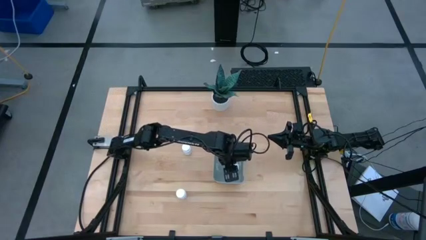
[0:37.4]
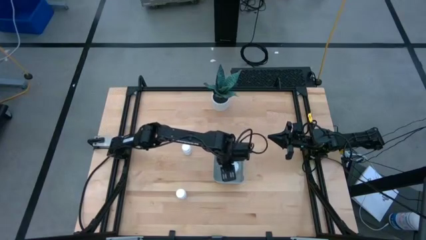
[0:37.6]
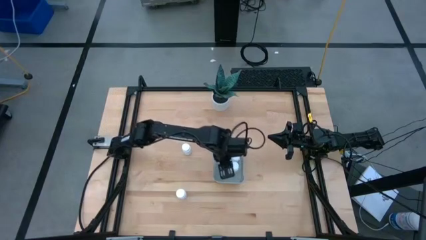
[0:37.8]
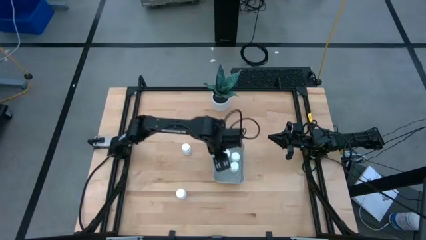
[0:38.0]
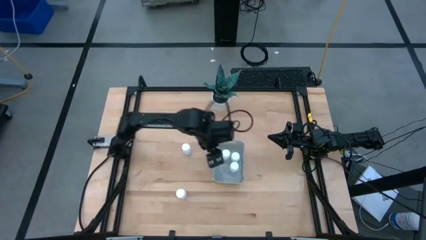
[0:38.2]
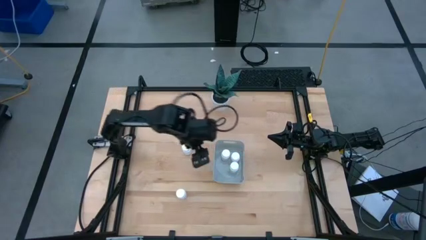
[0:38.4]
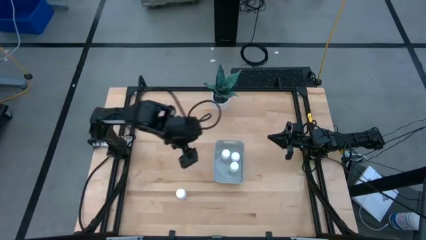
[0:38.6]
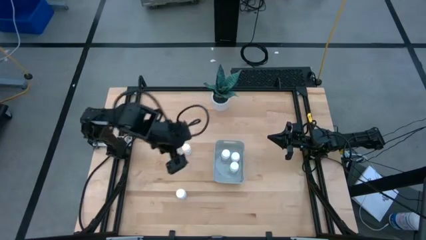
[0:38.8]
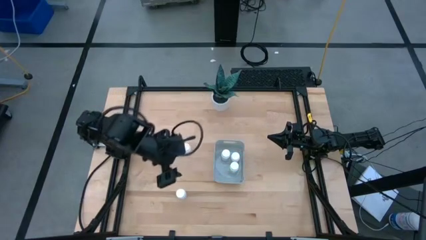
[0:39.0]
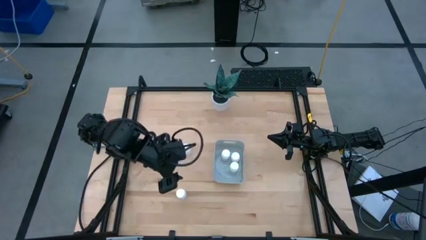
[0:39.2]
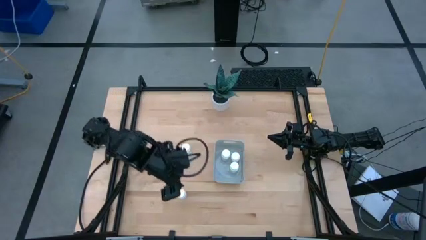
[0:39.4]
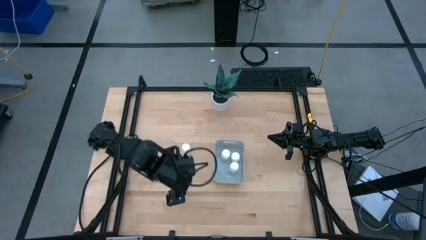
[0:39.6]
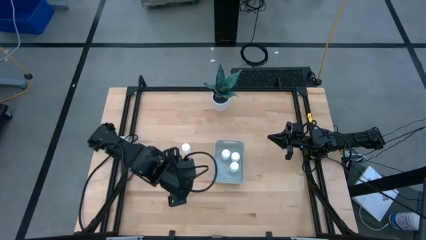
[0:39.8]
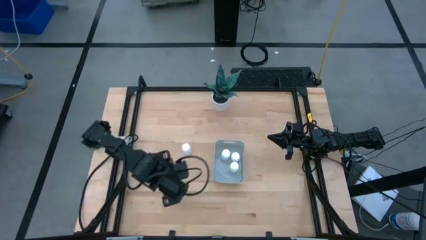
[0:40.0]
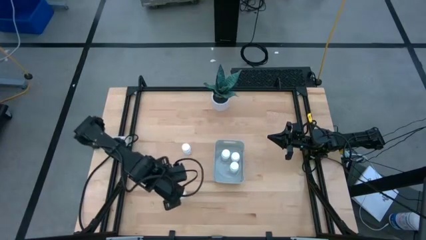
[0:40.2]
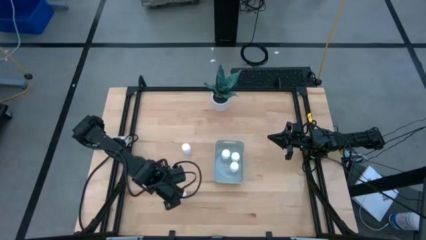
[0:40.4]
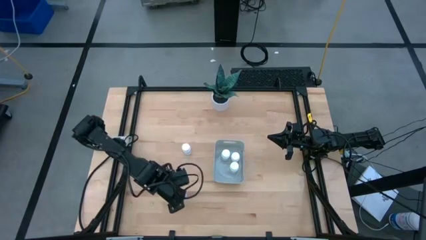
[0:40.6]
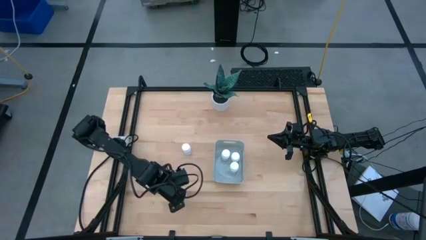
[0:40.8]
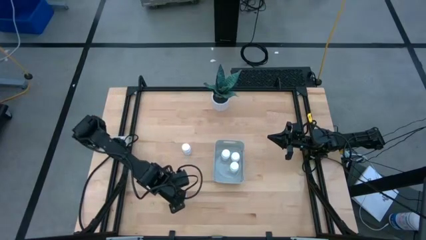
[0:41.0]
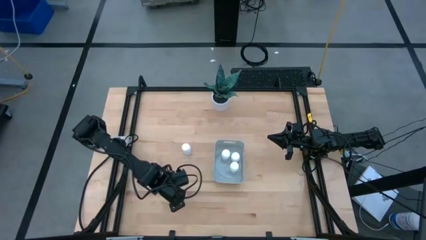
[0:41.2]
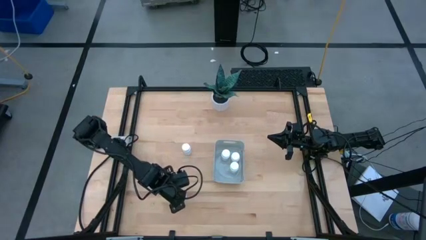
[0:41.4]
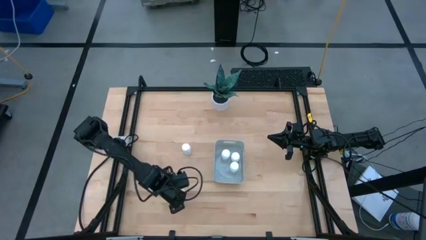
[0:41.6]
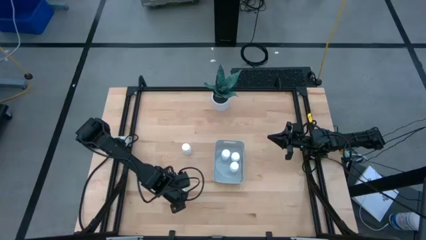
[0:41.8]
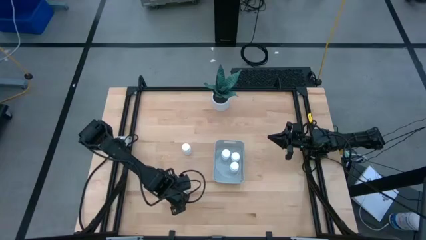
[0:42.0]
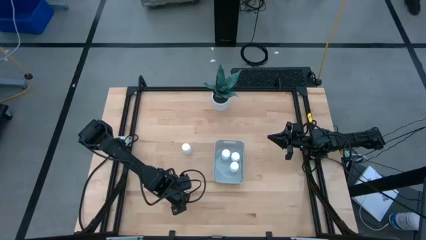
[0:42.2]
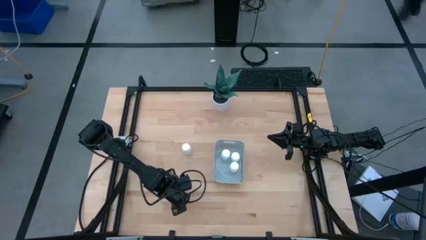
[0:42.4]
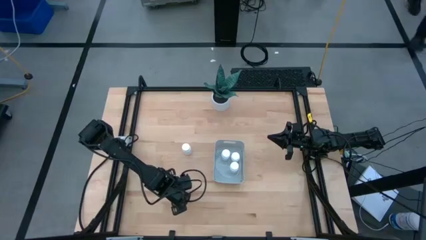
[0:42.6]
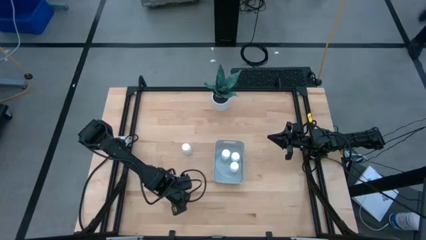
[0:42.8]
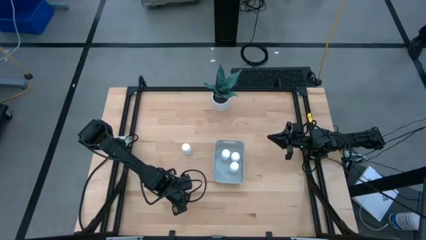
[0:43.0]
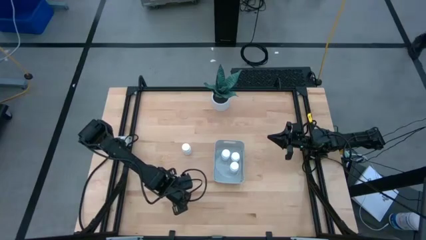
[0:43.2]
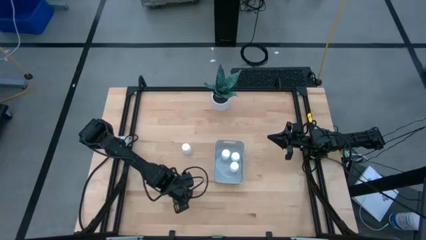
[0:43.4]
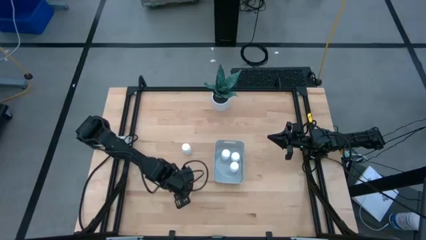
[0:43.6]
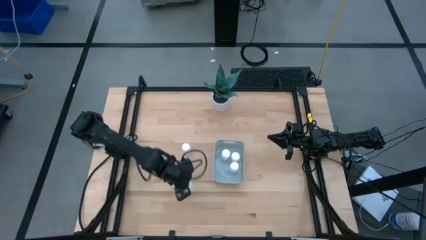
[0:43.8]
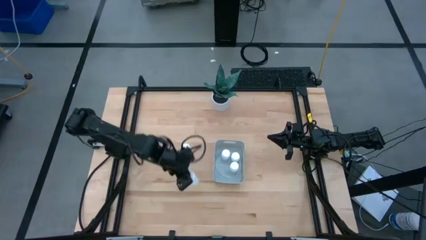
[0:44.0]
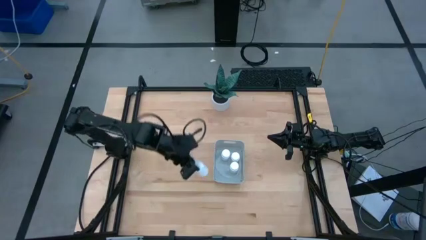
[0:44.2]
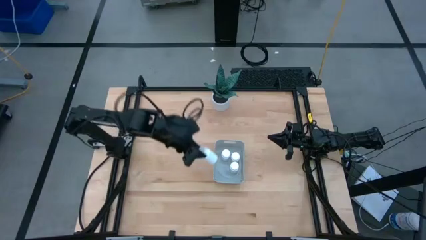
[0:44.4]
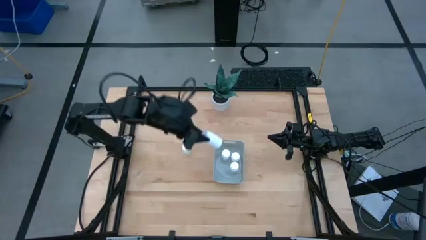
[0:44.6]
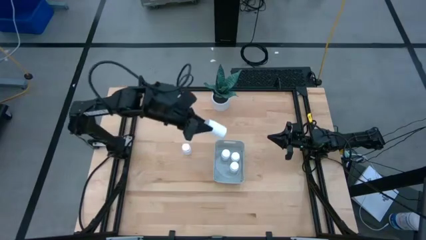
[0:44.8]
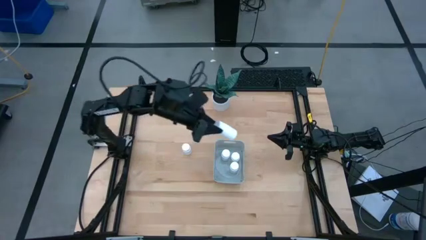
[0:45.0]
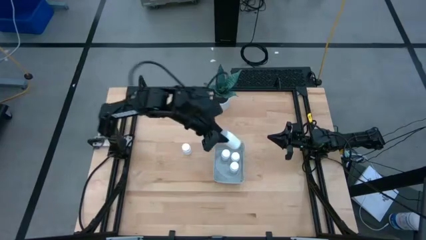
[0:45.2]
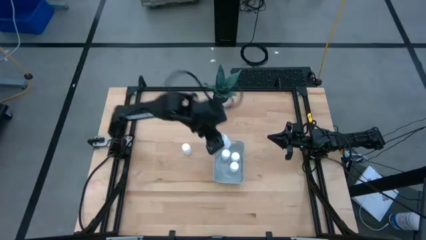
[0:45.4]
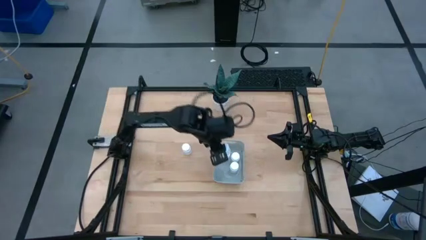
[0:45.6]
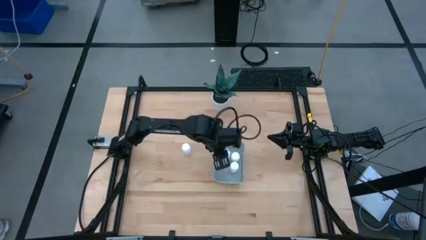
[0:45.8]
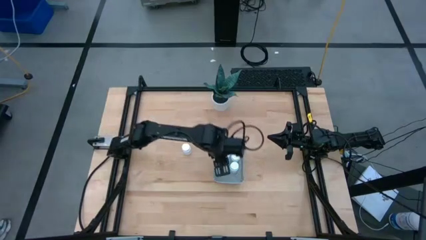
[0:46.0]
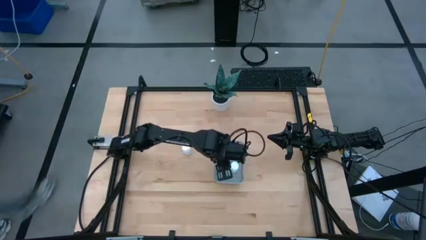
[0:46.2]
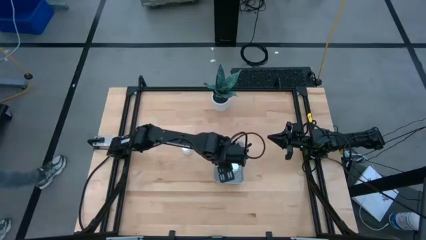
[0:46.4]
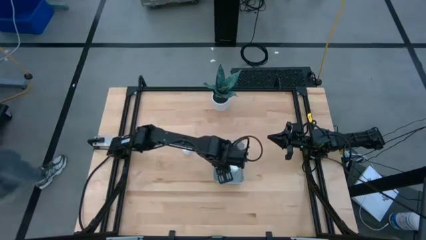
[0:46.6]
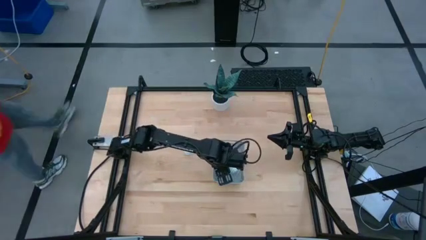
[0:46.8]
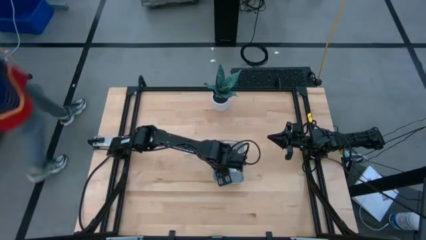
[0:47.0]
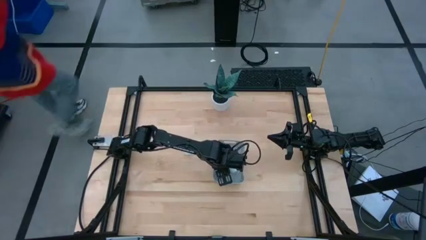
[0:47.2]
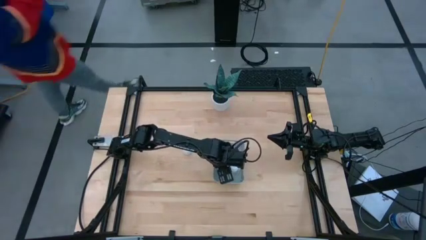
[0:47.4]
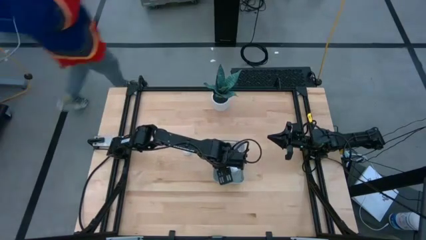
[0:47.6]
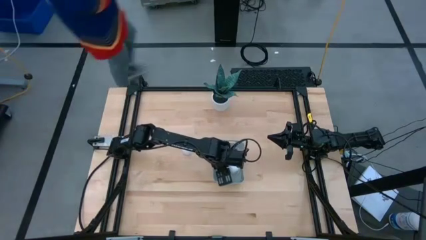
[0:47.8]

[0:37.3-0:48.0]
Task: Pick and place pill bottles into a basket
Put the white pill bottle into the gray bin

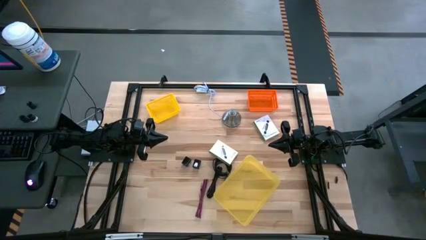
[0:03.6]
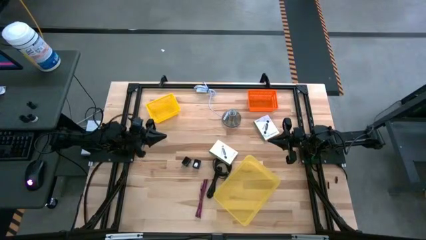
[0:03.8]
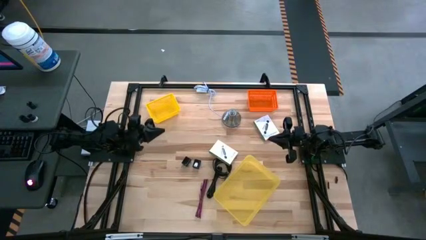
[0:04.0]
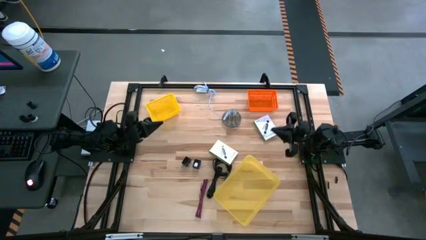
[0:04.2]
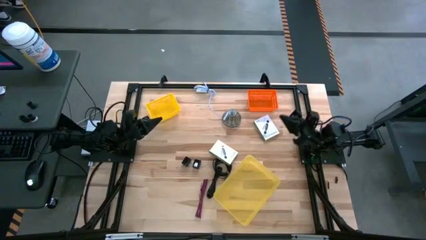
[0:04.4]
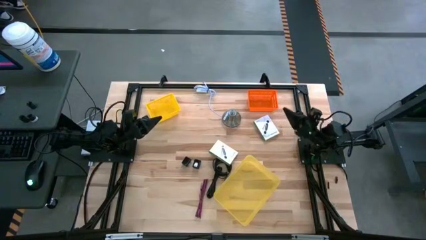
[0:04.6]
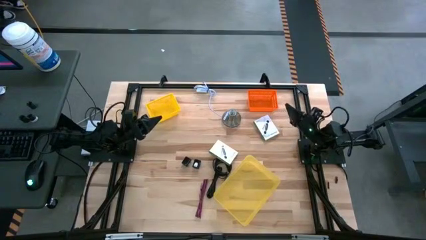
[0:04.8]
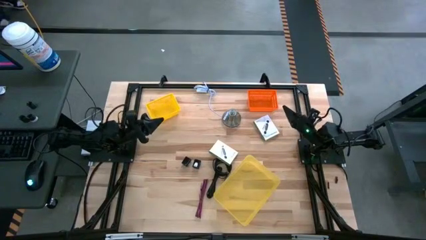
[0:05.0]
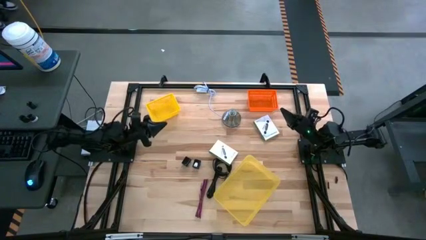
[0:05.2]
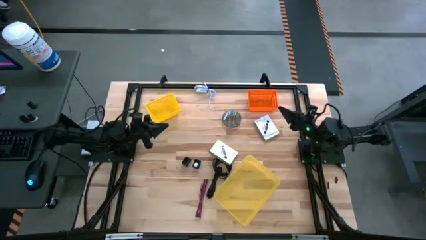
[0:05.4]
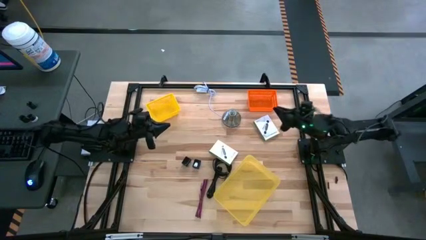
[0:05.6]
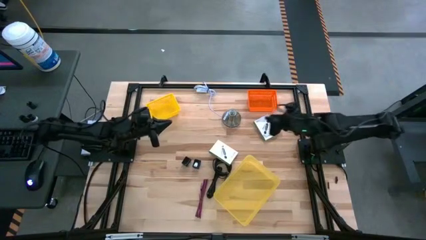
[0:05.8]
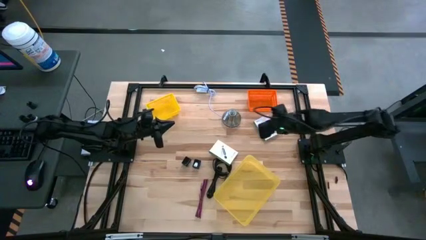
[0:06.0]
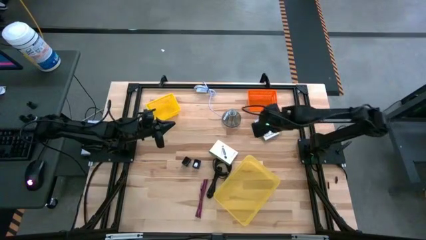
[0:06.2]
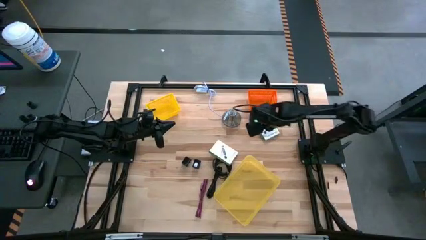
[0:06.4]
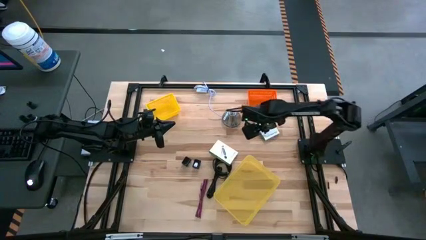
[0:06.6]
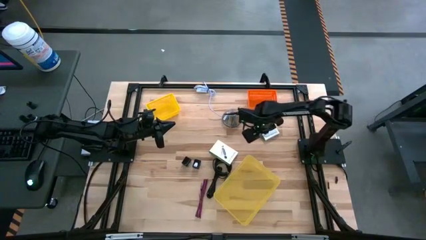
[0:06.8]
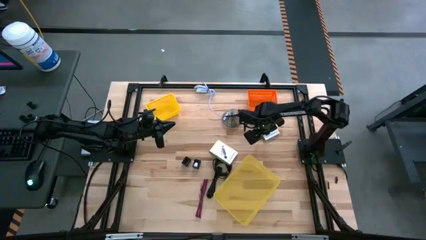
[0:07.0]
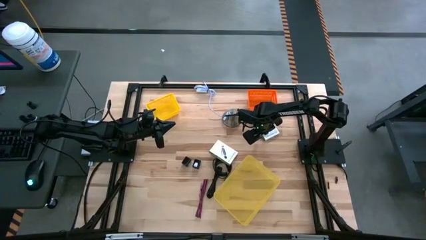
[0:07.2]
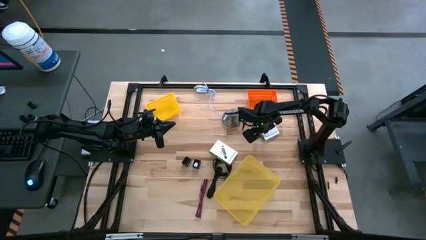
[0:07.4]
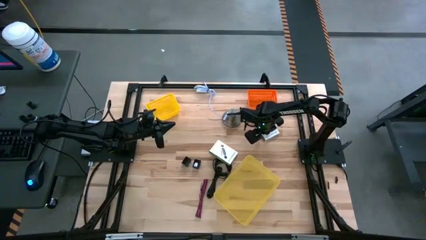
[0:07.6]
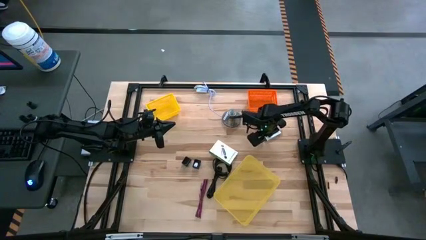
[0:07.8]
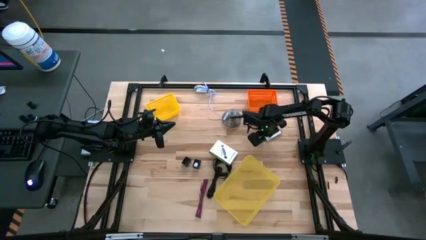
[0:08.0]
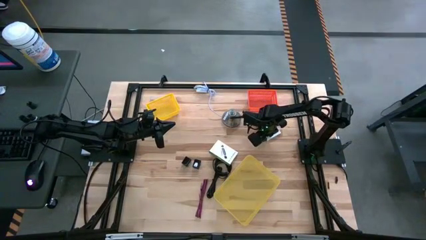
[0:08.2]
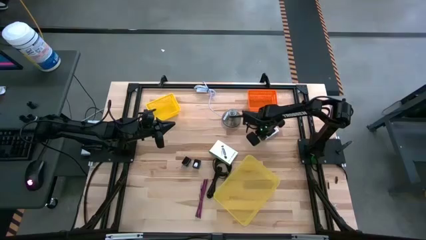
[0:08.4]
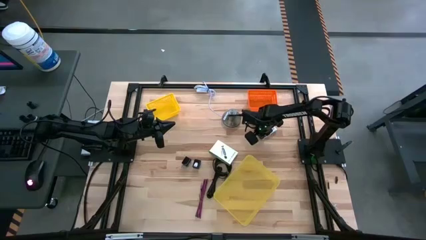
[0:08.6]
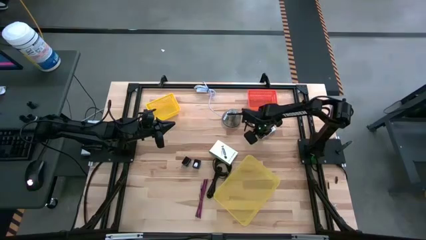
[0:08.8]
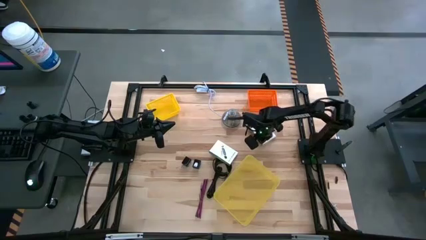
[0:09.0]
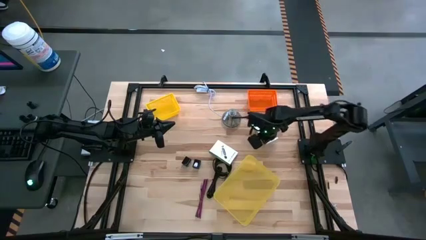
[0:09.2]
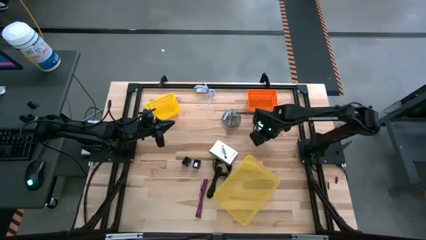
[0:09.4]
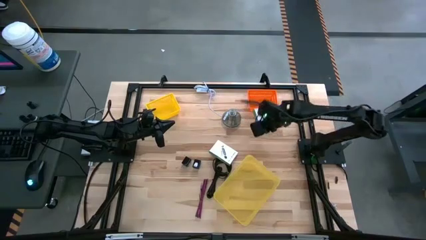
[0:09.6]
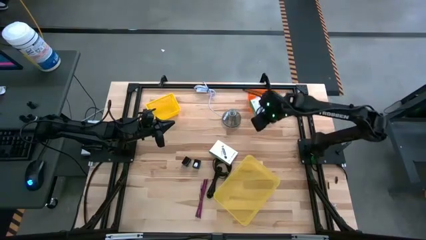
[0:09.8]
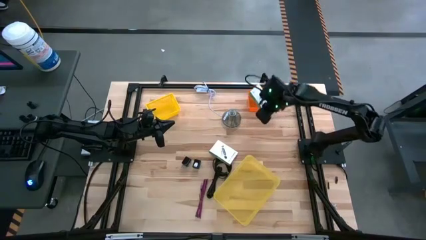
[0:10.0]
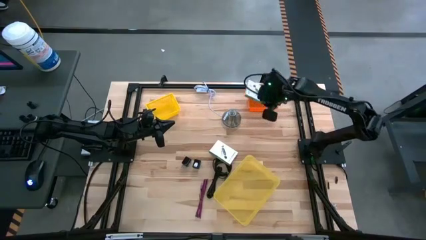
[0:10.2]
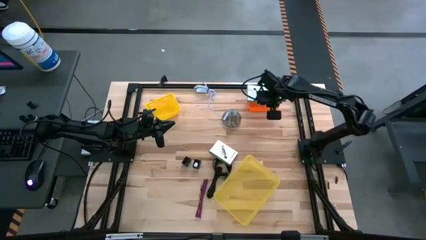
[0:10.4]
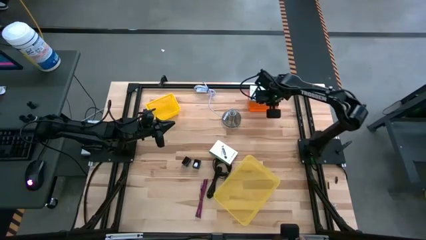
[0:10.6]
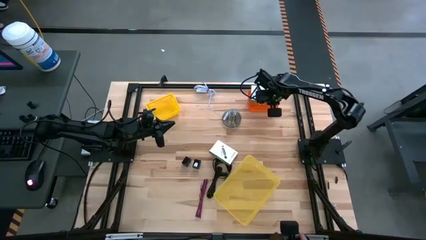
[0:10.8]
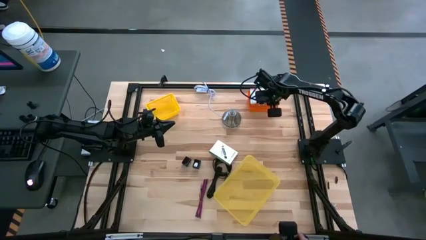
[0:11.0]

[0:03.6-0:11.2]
Task: Pick and place items into bin
Put the top white card reader box into the orange bin
